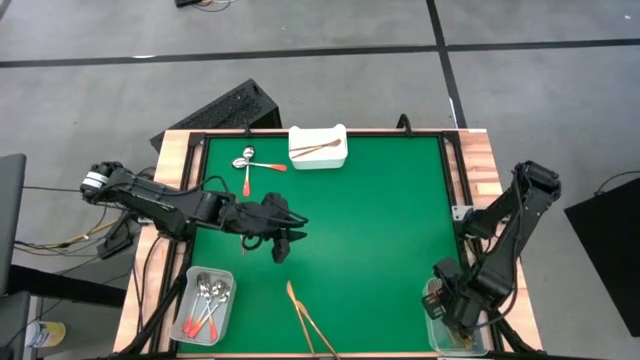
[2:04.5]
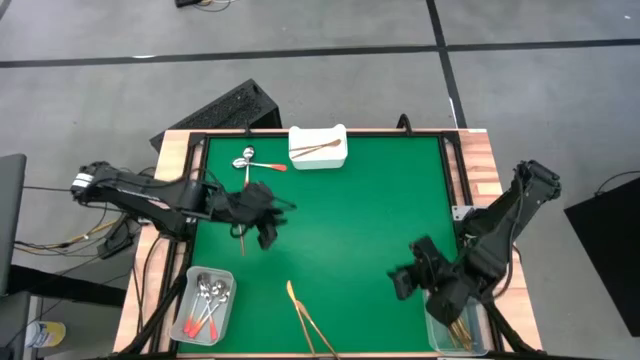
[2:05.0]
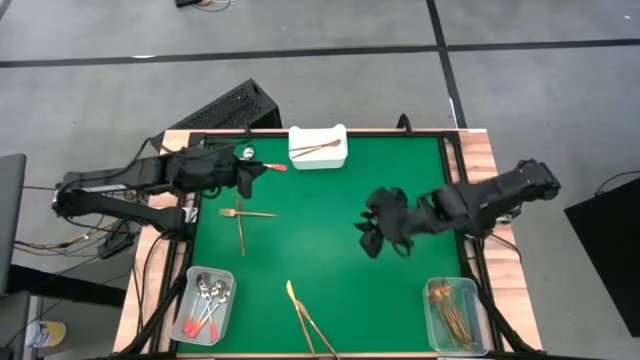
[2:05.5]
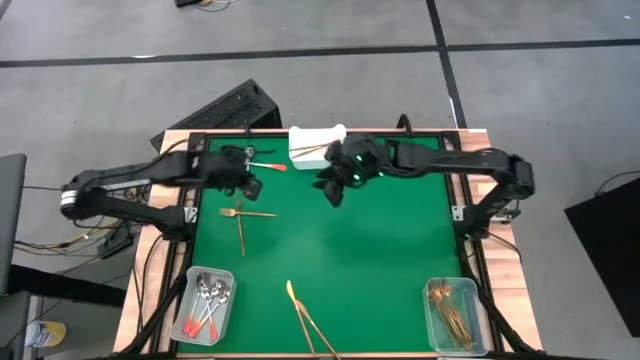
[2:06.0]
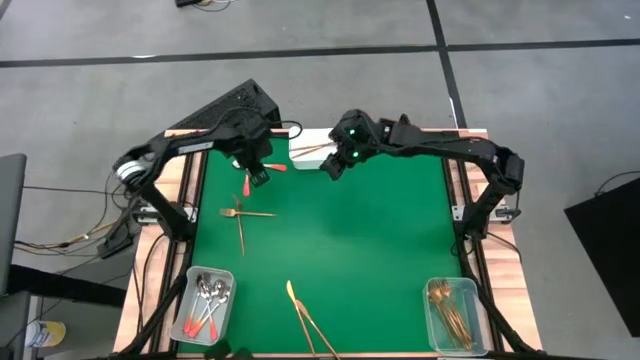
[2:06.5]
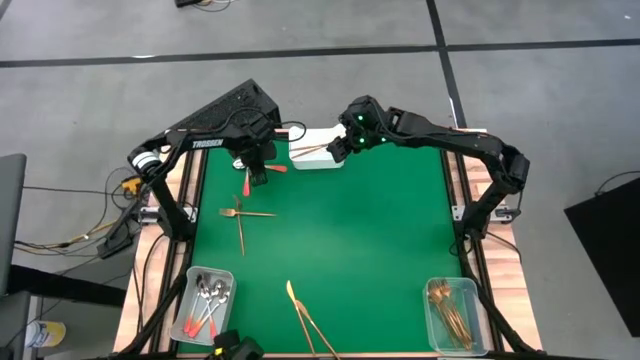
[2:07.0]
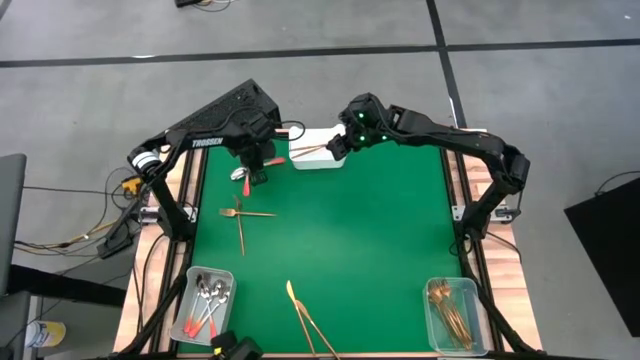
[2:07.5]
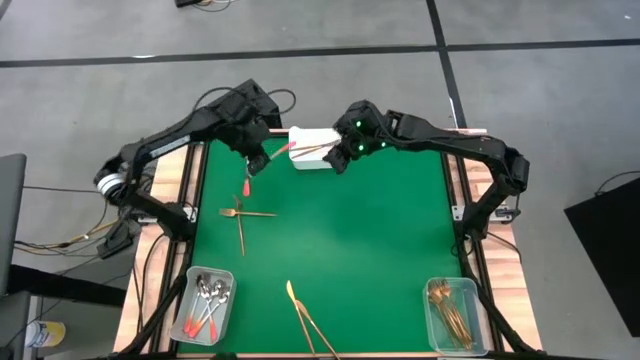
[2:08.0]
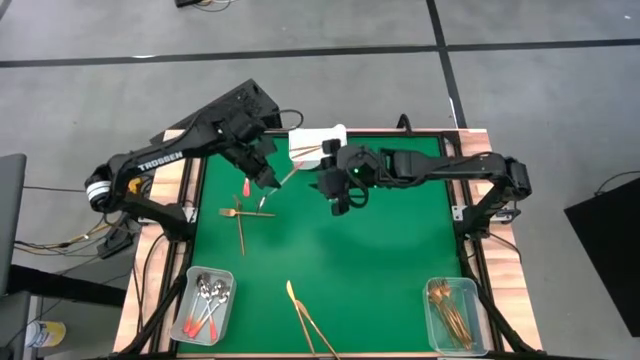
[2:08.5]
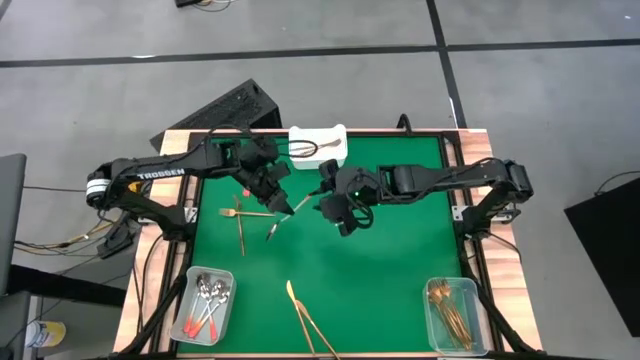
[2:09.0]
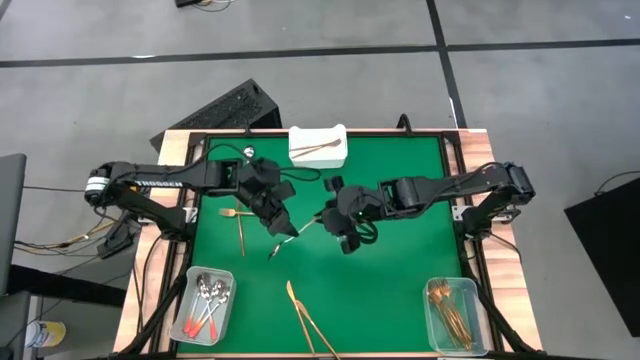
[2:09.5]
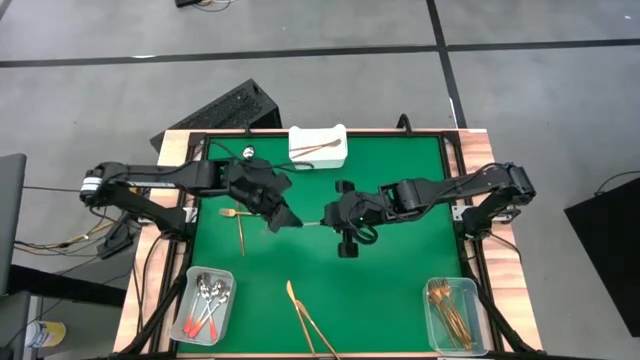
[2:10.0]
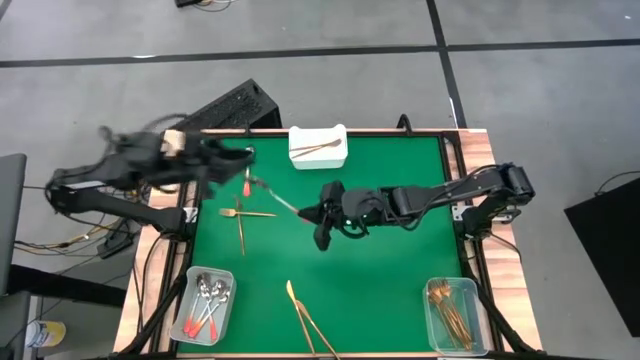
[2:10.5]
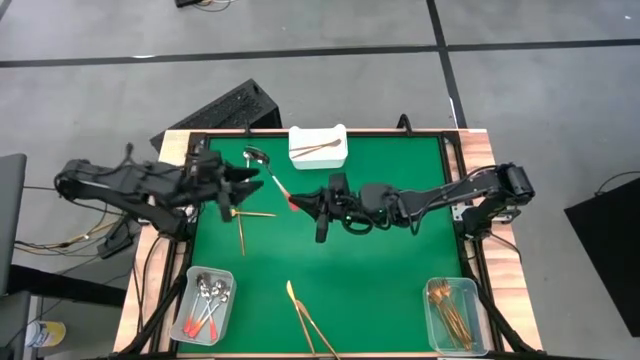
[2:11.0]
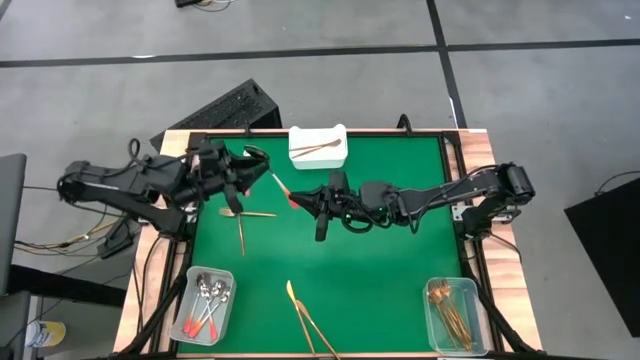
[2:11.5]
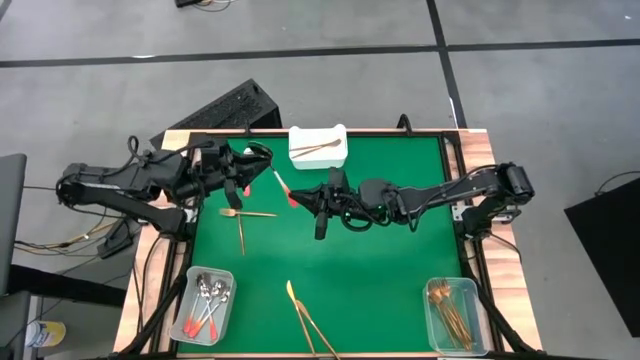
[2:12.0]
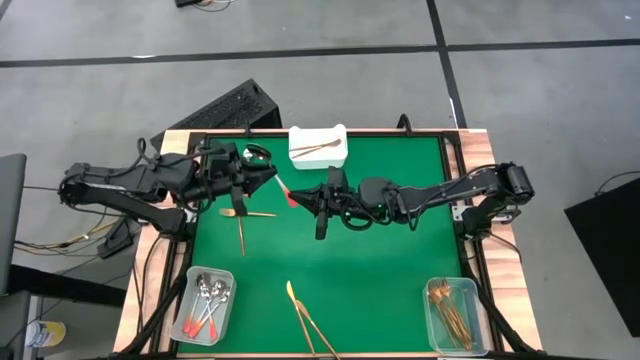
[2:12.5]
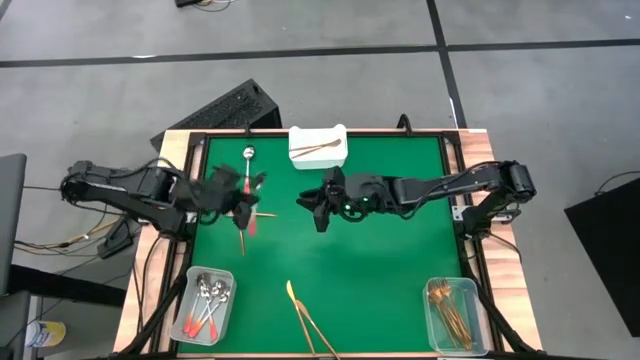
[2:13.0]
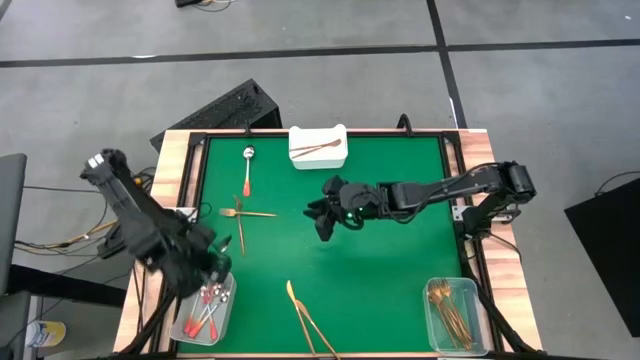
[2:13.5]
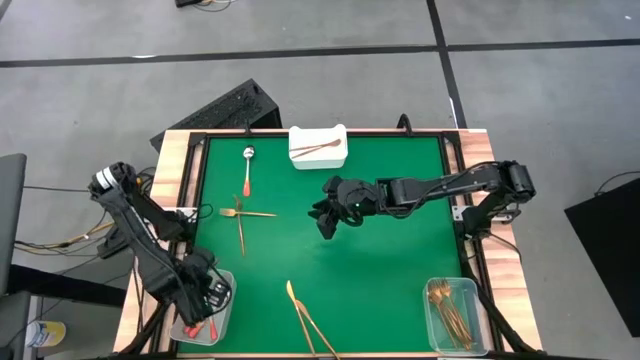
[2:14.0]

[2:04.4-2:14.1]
Task: Sort silverware by color (type)
Put the orange spoon into the gray bin

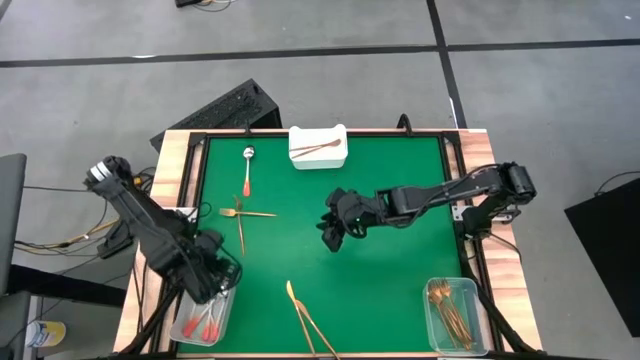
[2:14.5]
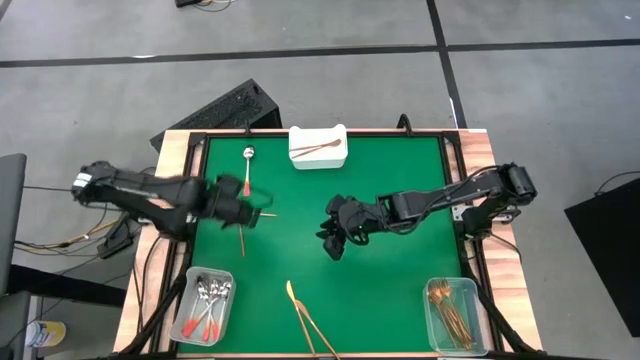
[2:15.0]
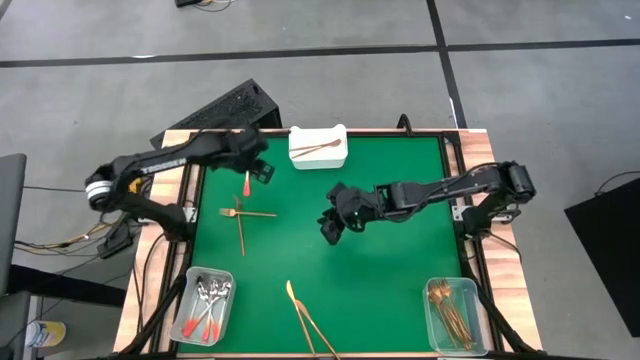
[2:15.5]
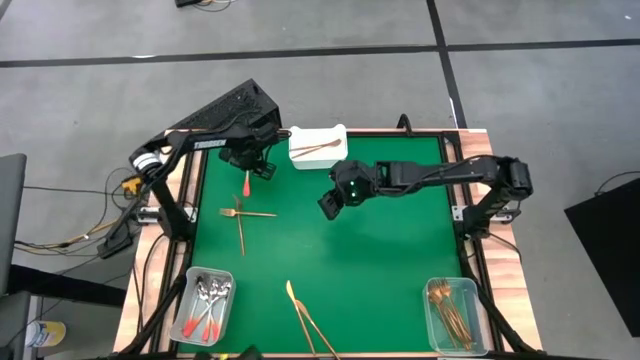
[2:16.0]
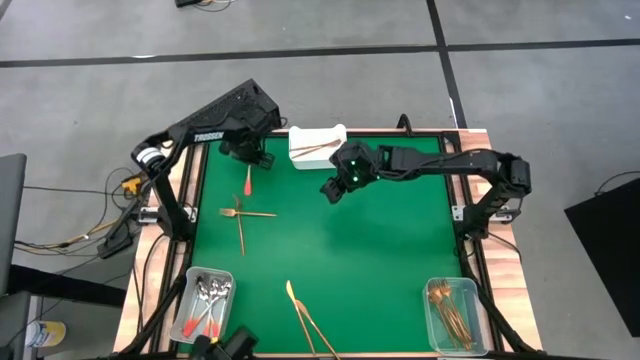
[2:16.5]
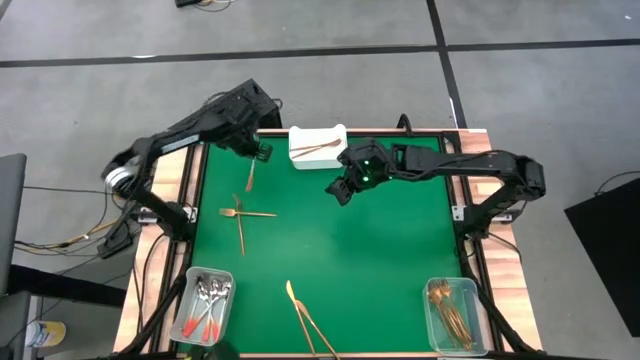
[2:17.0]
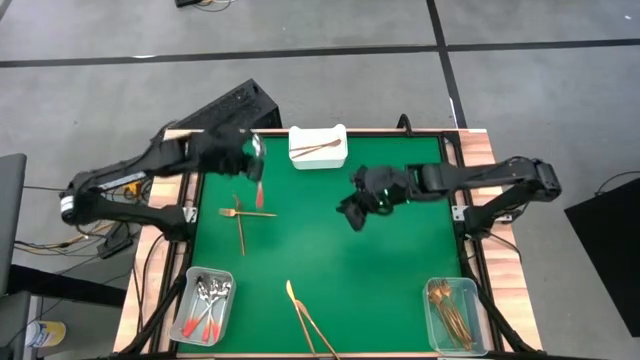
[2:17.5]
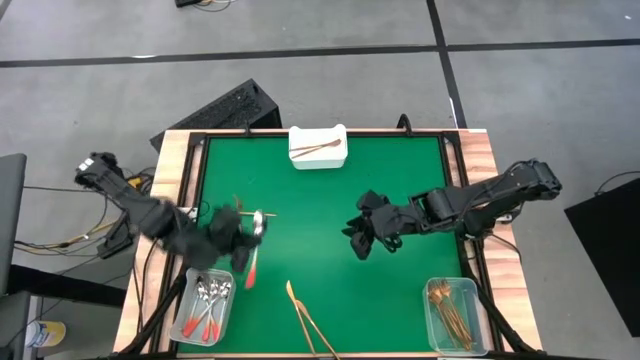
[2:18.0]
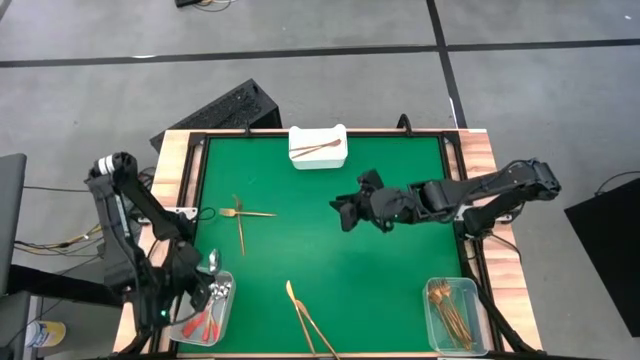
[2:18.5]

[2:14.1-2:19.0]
Put the orange spoon into the gray bin

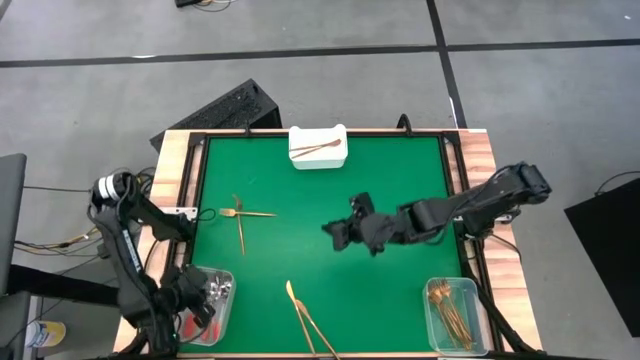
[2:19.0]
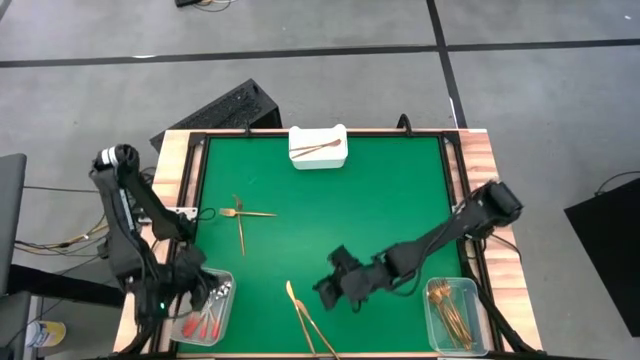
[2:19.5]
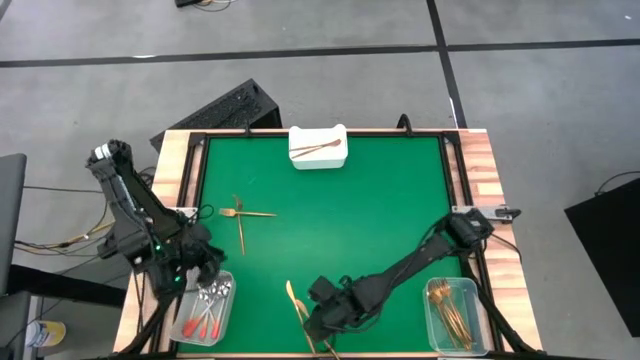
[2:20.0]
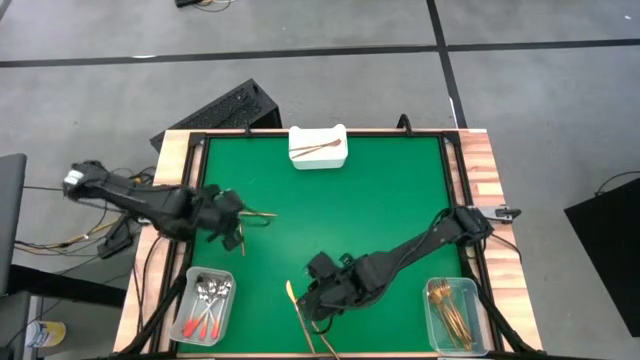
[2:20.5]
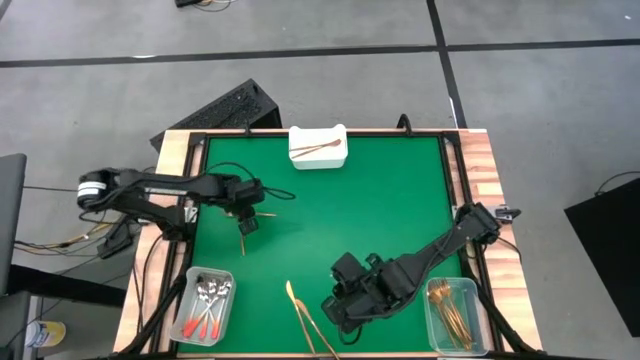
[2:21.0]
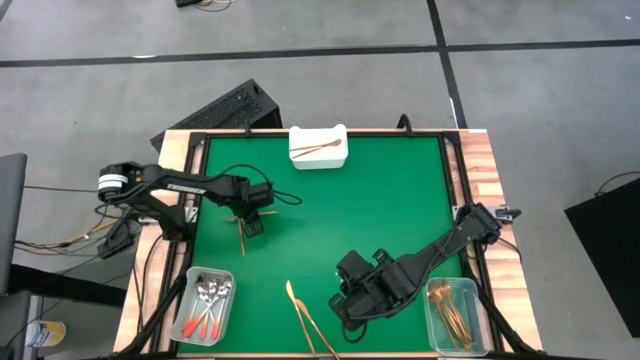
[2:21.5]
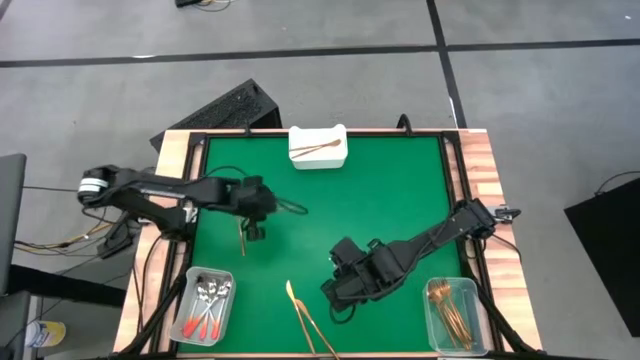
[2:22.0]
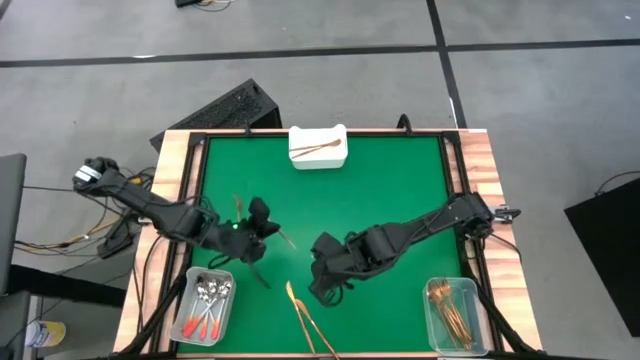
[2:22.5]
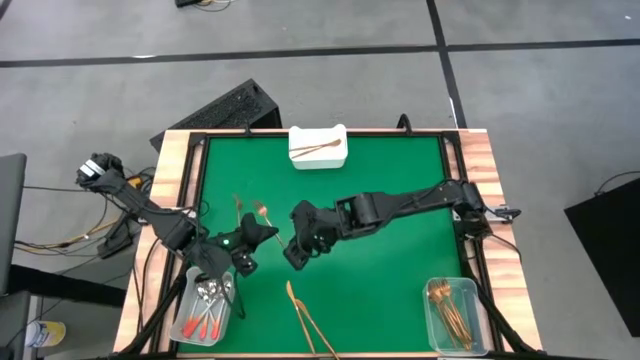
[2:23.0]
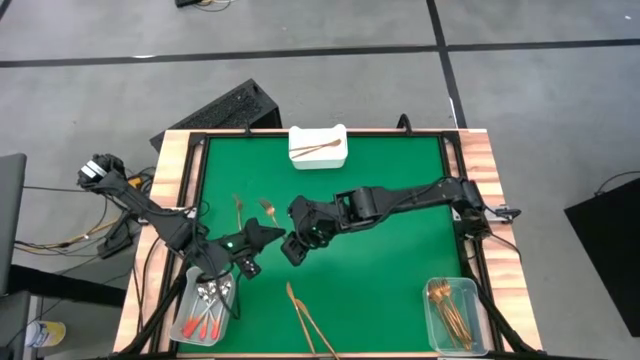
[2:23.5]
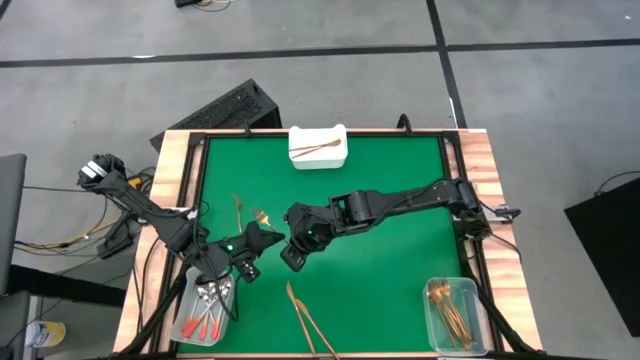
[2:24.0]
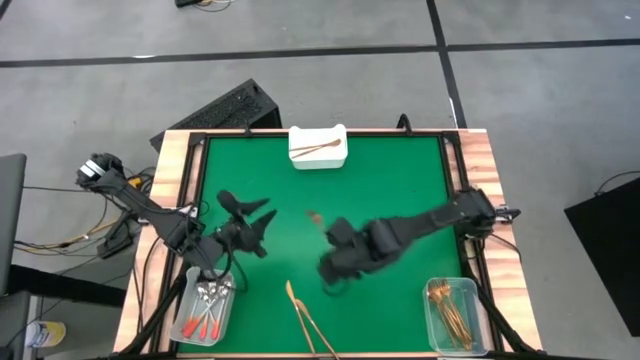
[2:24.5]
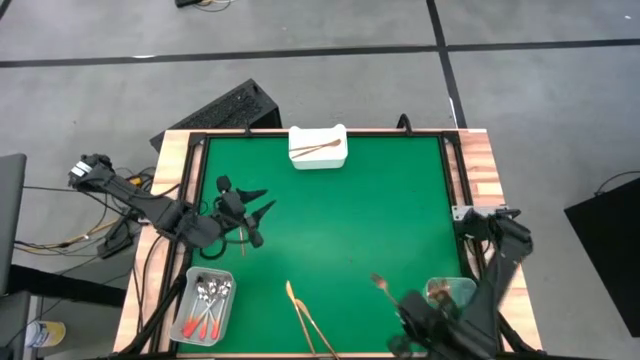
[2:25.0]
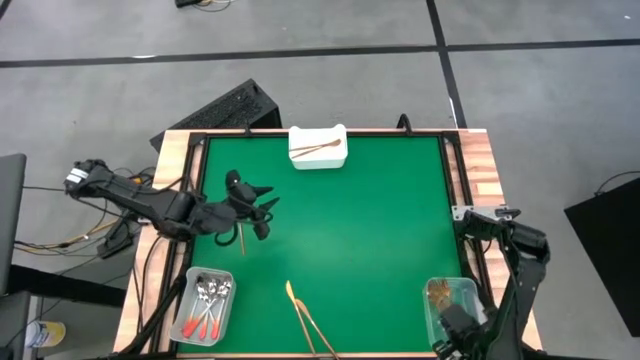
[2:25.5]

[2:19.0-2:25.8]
Put the gold fork into the transparent bin

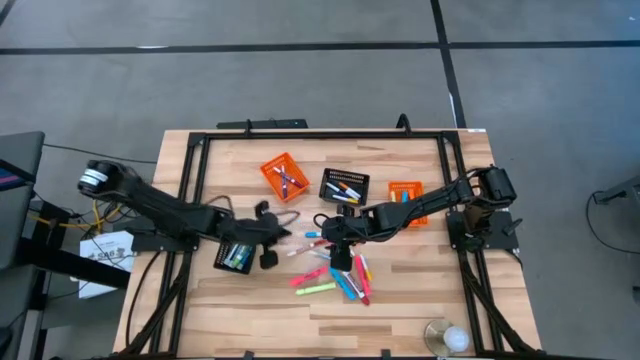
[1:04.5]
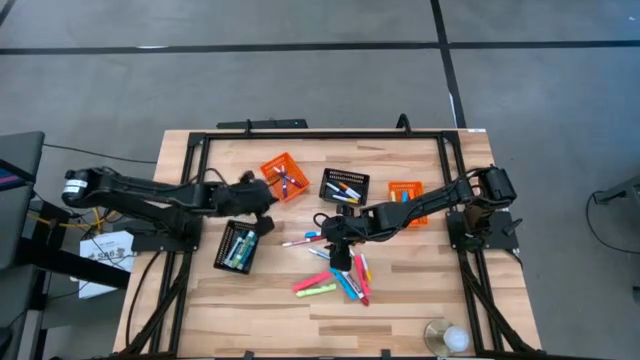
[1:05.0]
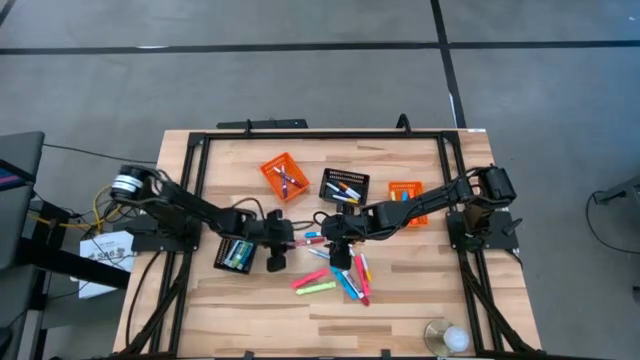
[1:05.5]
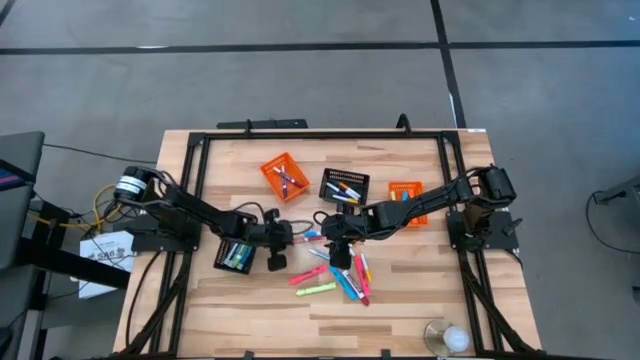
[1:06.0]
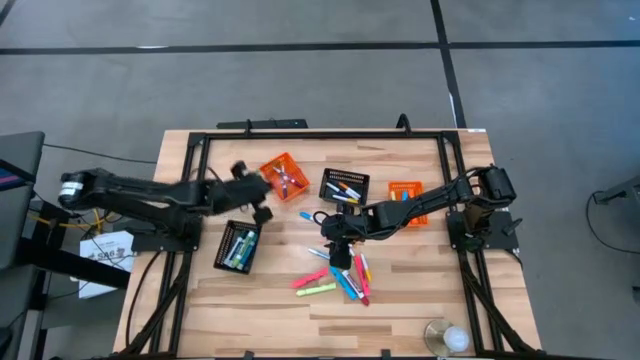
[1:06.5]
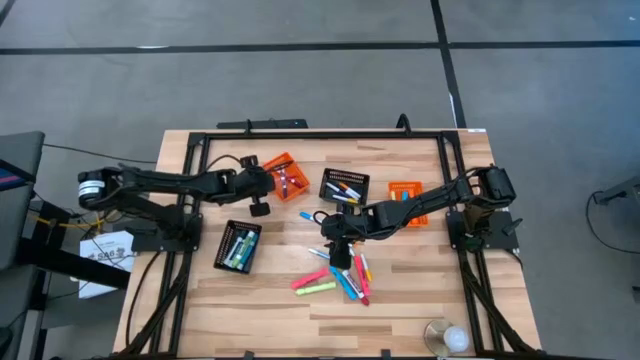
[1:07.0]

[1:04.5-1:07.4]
Task: Pick & Place Markers
Put the red marker into the left orange bin
